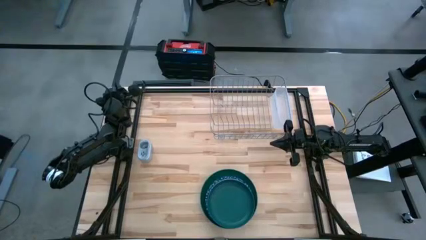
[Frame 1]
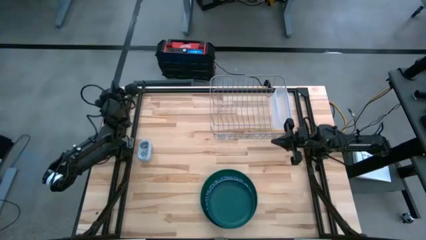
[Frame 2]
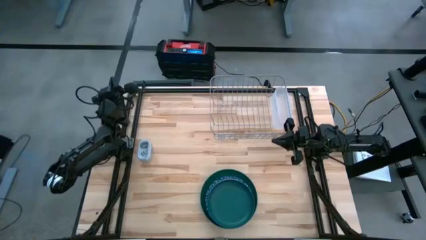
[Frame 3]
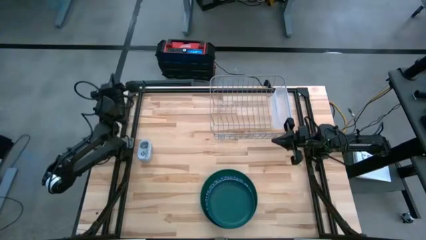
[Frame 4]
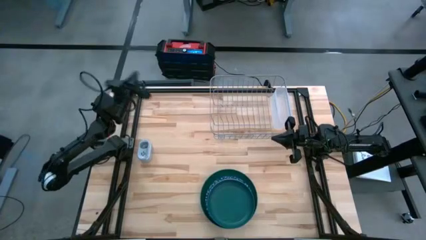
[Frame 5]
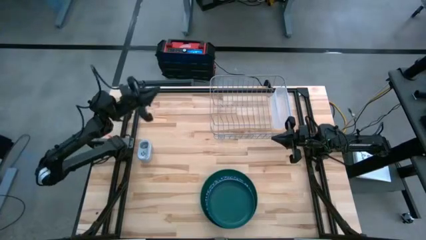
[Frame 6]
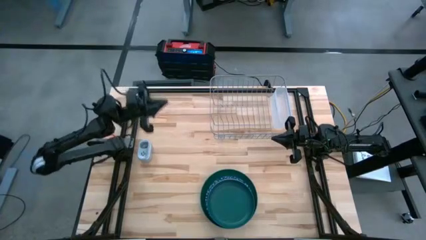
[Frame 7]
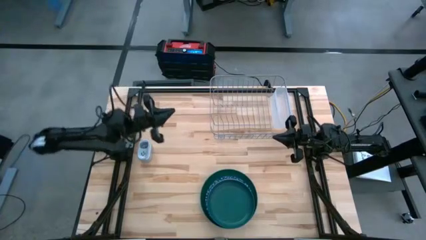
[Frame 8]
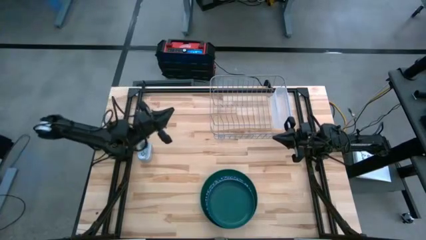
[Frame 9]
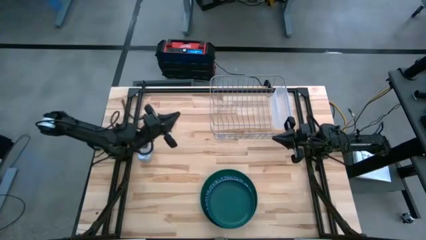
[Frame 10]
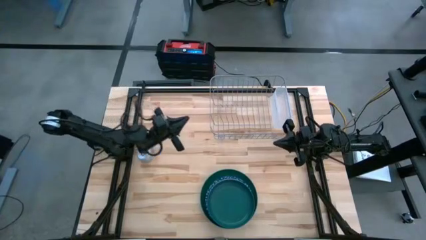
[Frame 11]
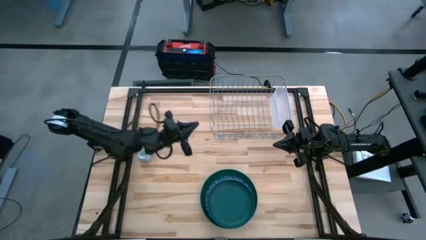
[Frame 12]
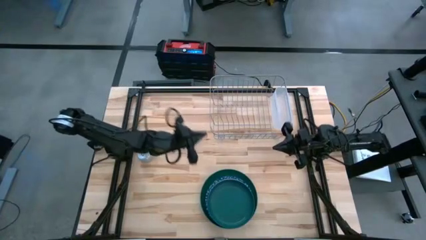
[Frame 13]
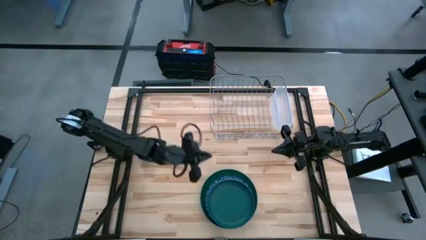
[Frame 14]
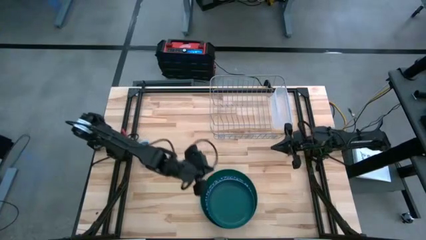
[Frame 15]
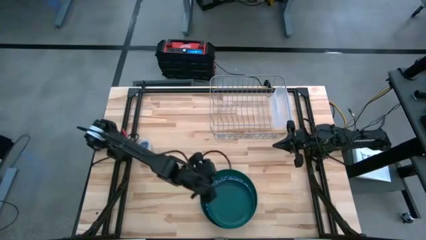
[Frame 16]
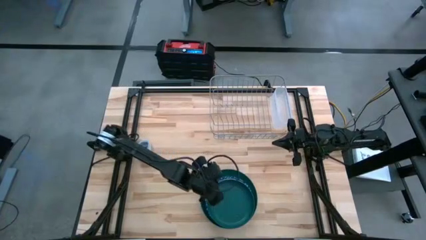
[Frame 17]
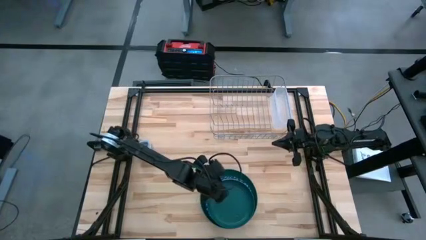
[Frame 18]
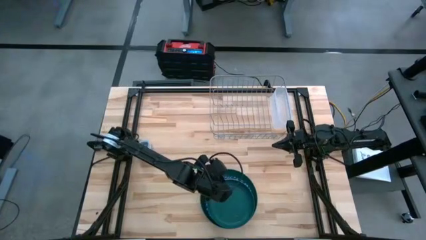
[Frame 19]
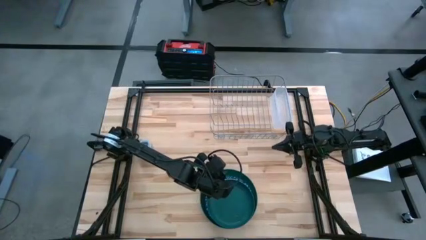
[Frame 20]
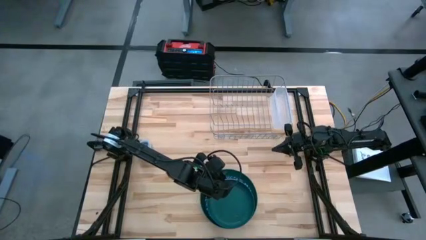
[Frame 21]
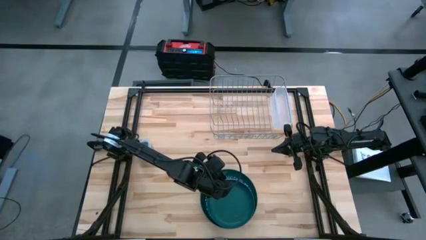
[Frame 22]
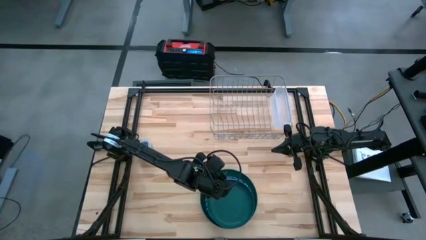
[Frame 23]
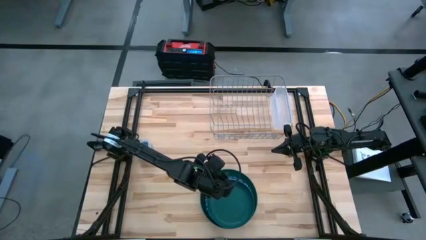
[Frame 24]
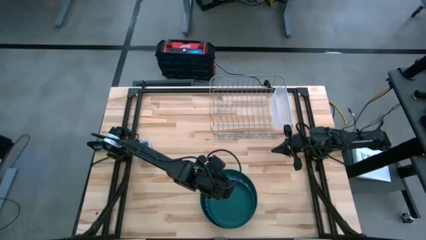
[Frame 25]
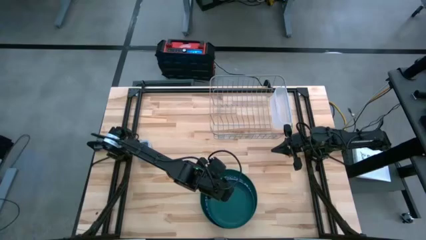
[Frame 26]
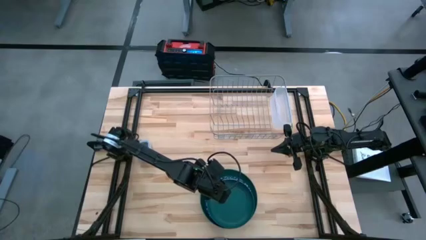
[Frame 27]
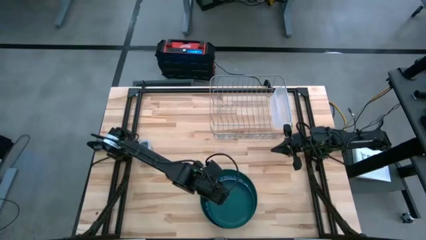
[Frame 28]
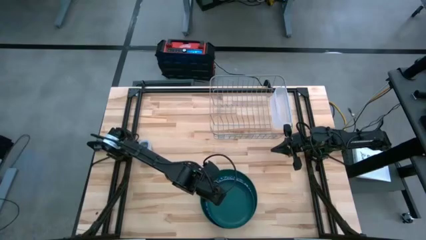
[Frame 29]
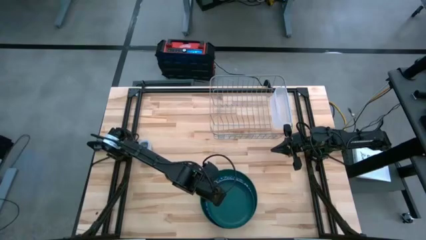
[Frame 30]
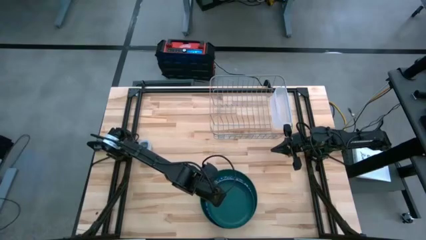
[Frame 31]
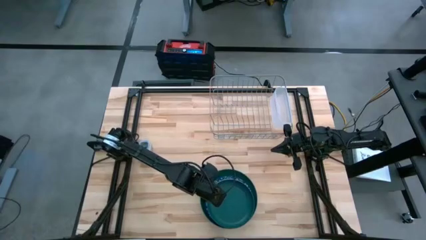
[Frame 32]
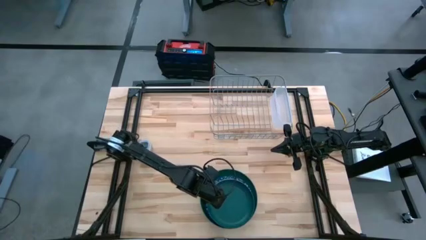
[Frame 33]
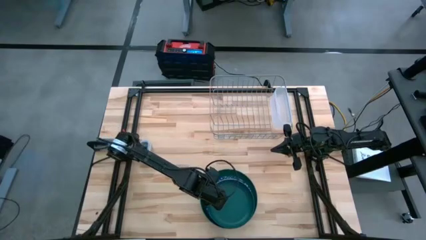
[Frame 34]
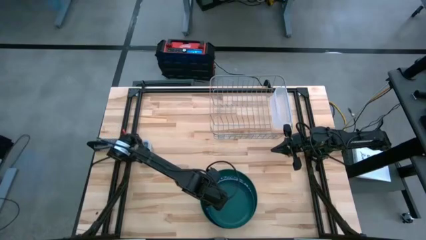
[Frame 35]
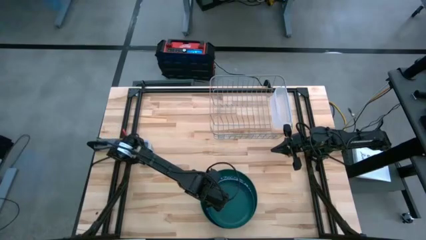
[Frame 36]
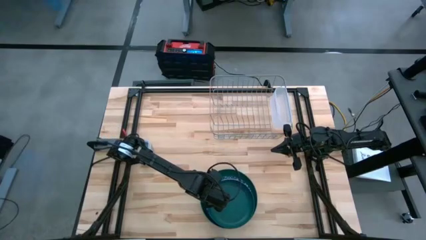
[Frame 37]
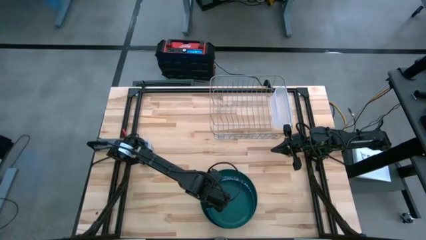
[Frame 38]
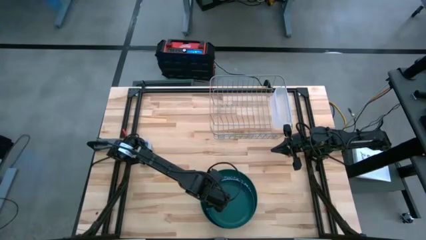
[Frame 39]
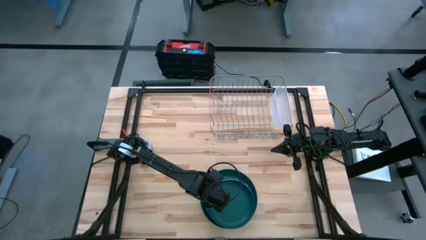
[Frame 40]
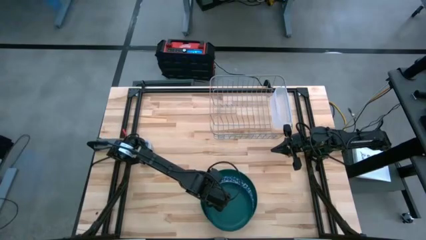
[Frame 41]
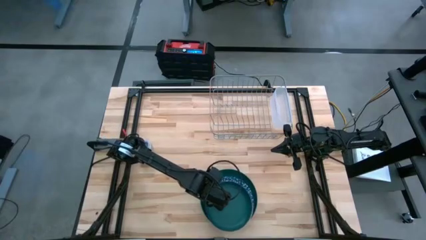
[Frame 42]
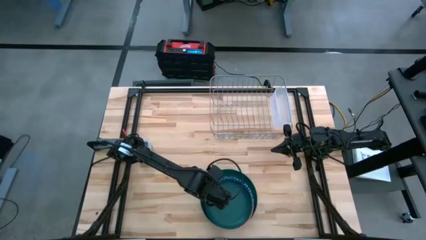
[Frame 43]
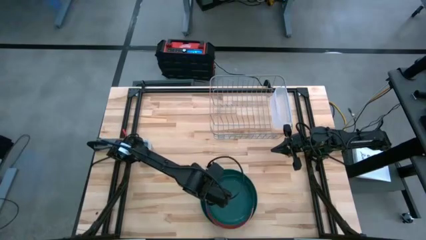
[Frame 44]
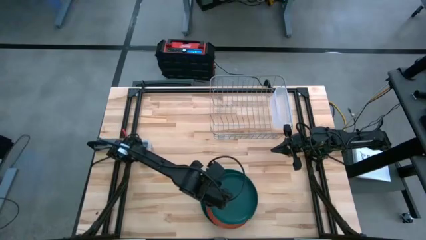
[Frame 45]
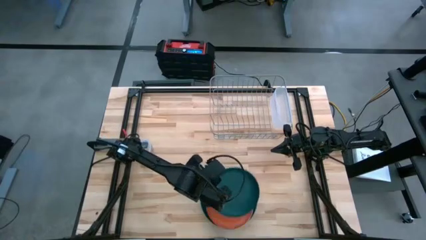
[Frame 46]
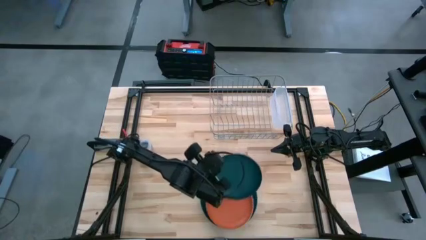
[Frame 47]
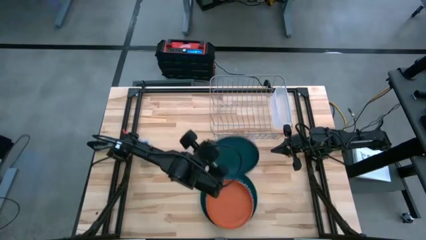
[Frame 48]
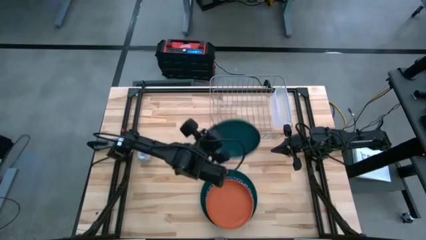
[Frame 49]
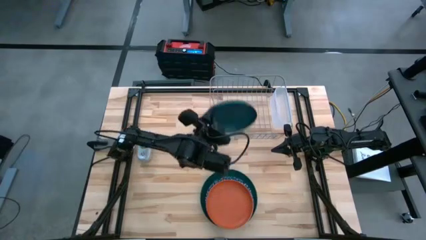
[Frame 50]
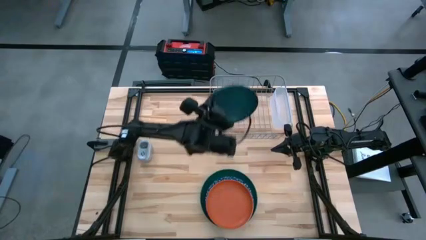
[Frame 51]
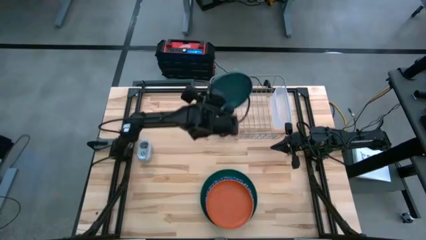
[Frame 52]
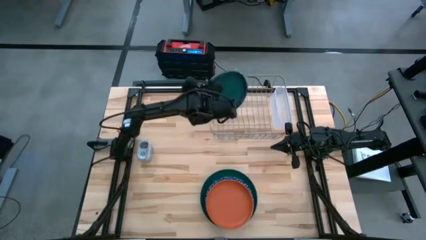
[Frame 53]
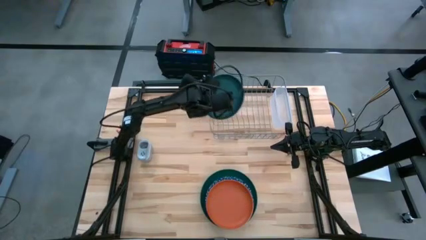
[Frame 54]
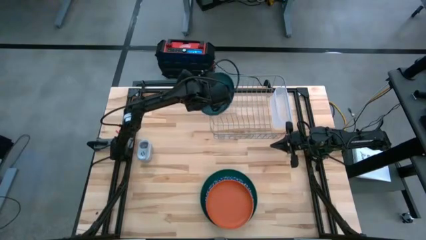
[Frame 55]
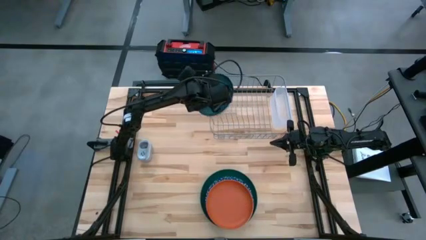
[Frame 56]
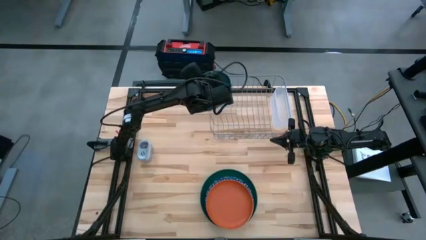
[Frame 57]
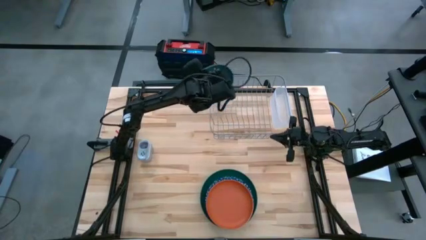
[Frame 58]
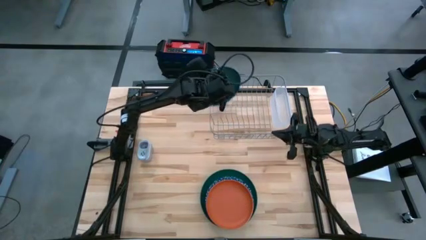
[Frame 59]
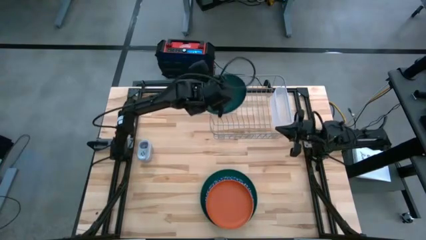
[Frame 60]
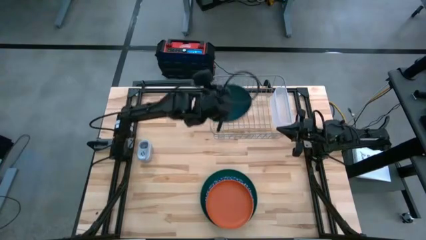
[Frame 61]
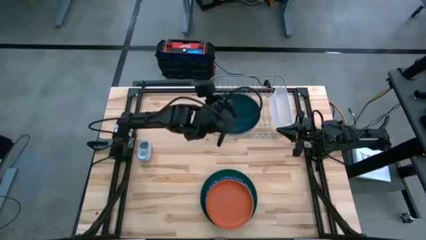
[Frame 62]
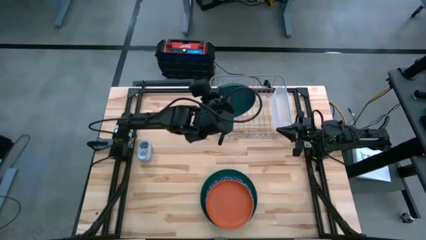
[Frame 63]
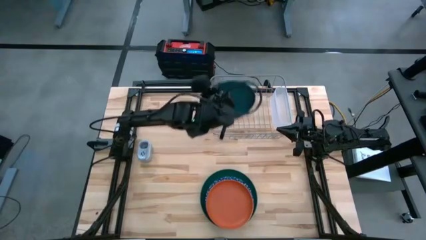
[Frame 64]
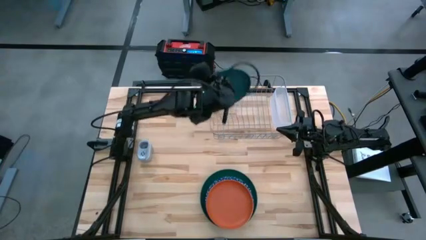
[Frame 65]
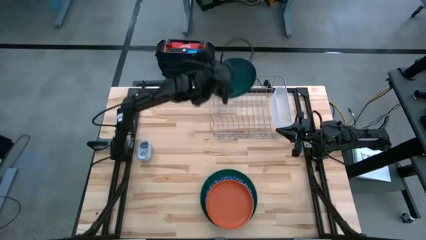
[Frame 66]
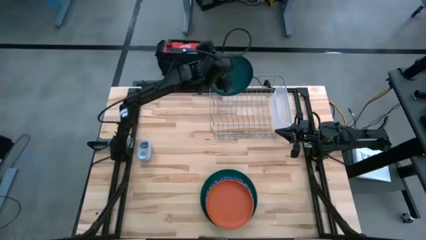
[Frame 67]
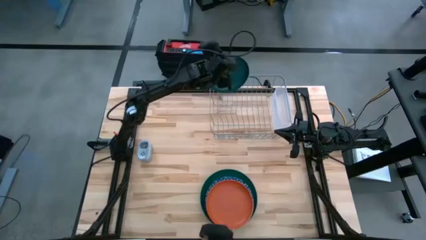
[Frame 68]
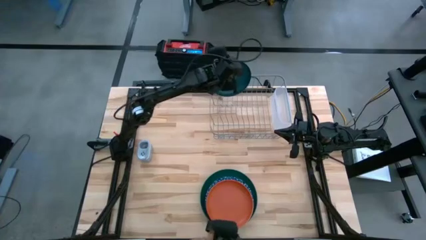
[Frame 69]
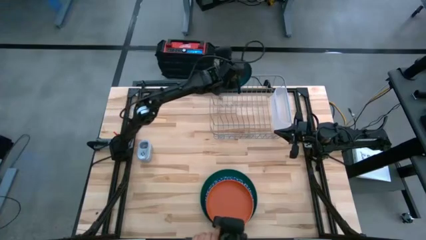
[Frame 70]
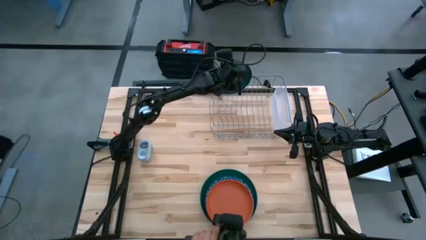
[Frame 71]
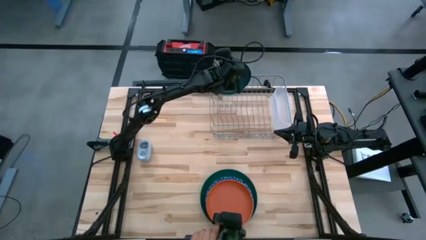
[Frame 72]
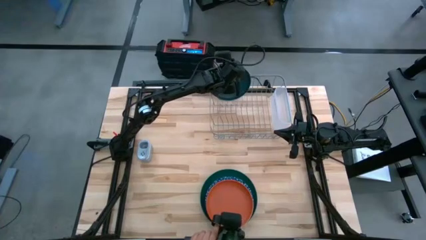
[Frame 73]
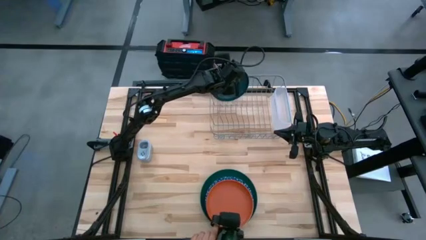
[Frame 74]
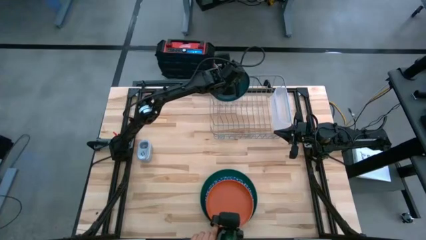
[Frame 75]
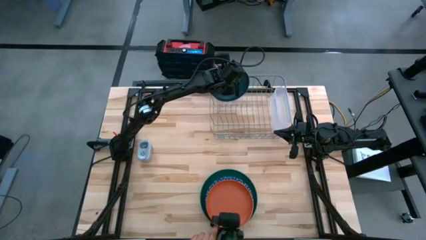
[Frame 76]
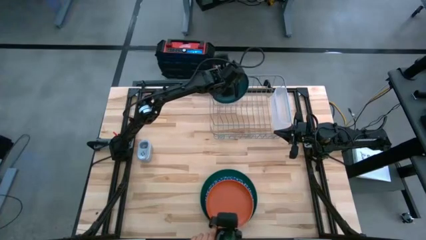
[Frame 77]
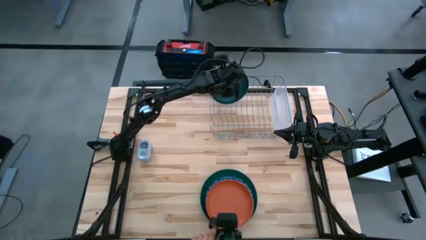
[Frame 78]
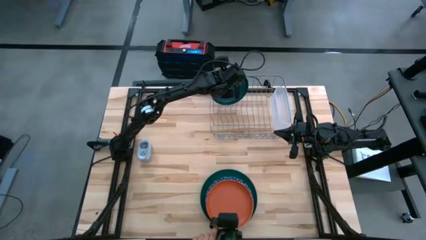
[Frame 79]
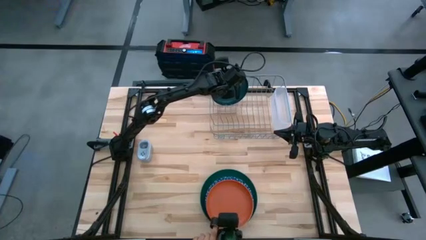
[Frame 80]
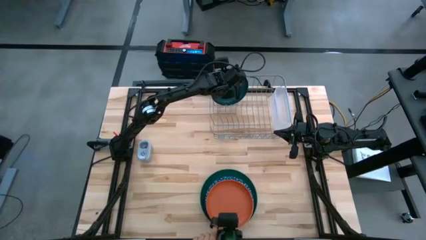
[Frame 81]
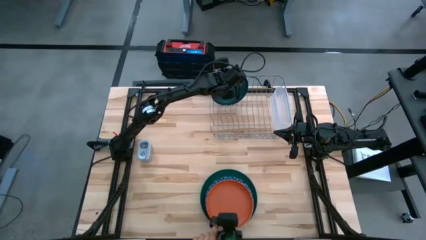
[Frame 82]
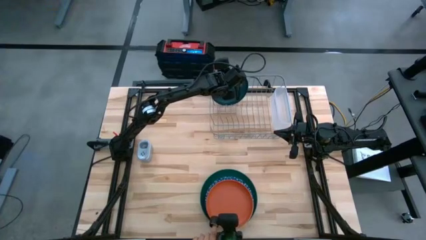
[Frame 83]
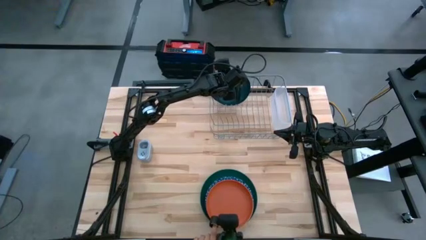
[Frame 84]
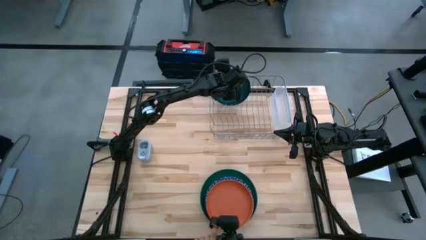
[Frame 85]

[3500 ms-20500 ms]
Task: Sort dishes
Put the blue plate in the dish rack
